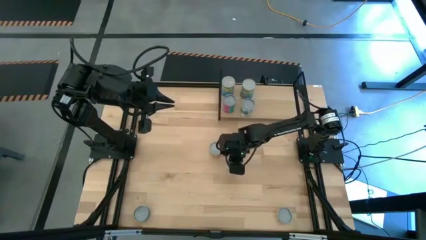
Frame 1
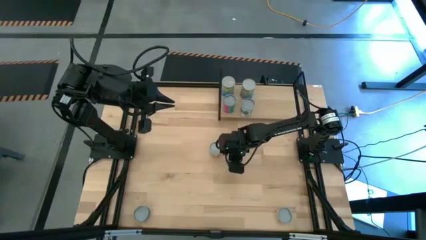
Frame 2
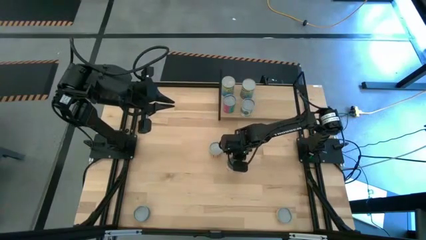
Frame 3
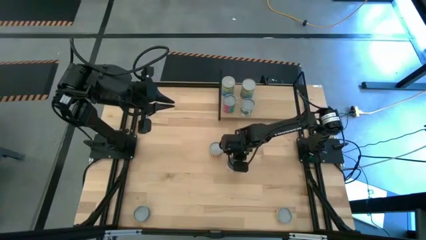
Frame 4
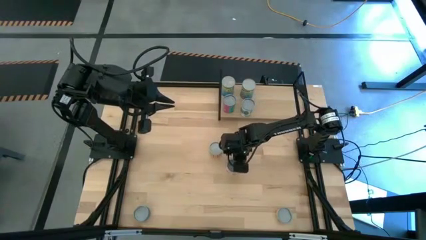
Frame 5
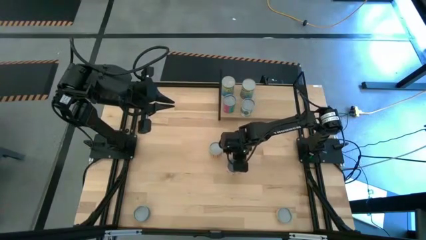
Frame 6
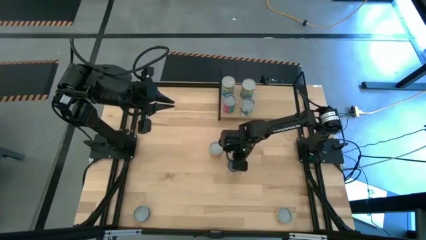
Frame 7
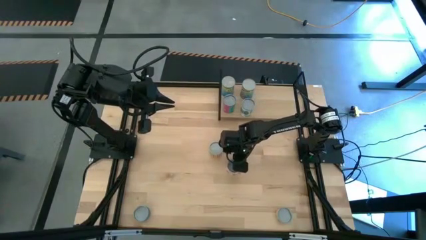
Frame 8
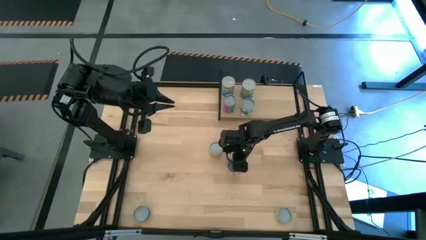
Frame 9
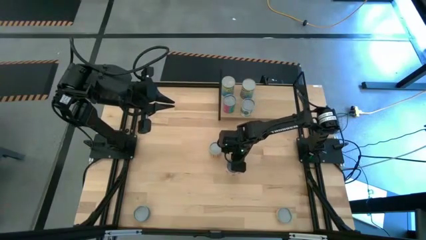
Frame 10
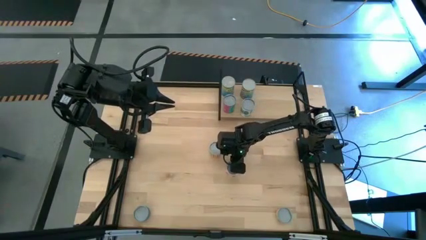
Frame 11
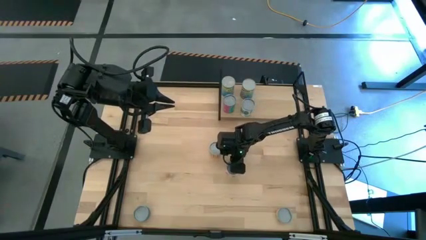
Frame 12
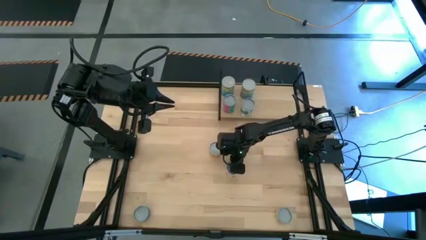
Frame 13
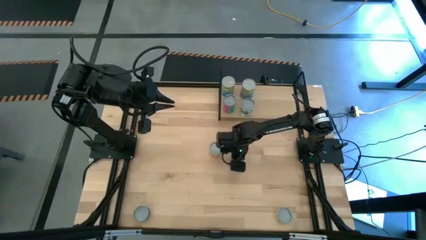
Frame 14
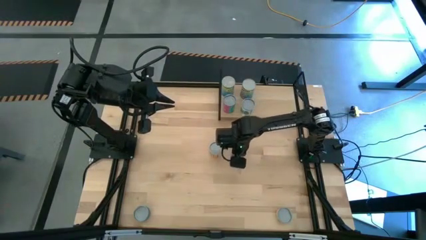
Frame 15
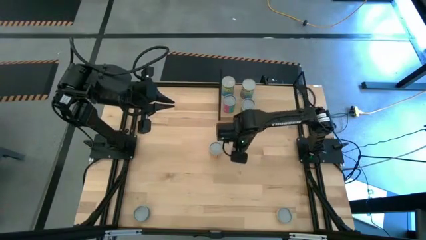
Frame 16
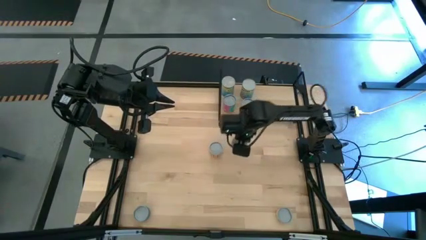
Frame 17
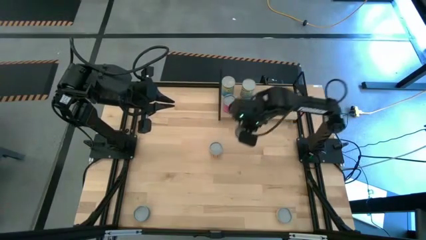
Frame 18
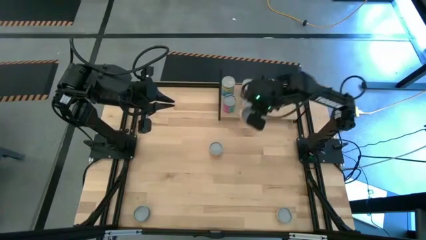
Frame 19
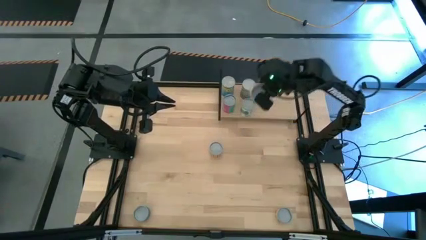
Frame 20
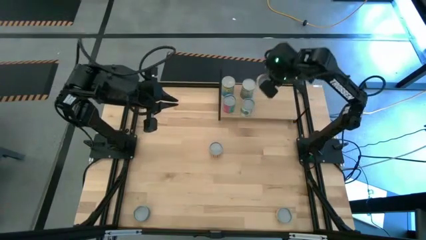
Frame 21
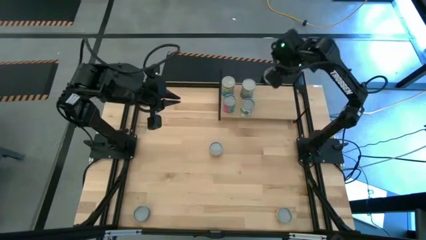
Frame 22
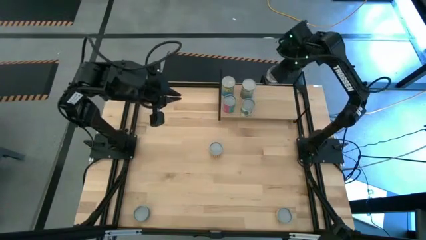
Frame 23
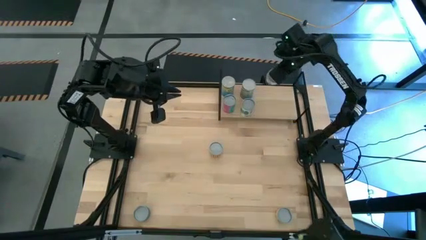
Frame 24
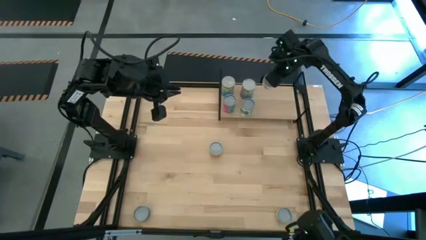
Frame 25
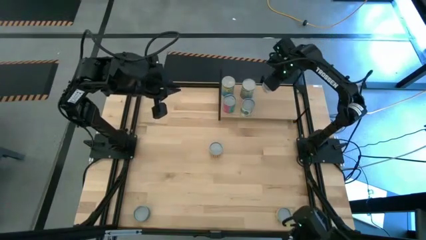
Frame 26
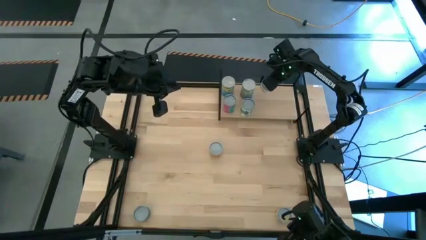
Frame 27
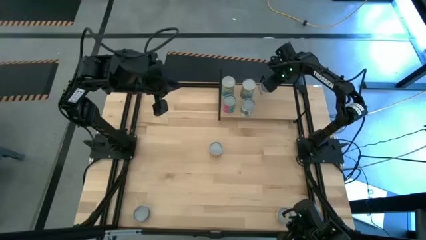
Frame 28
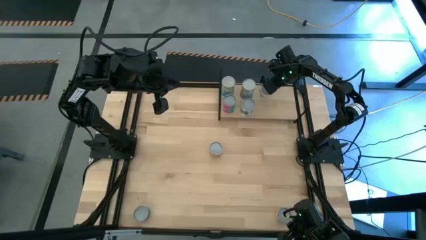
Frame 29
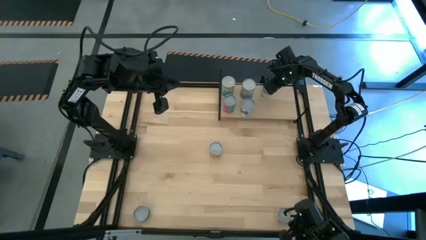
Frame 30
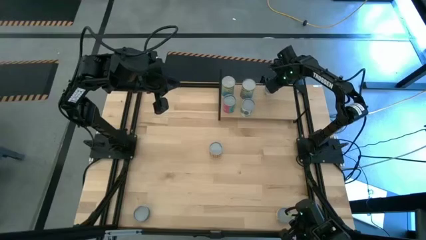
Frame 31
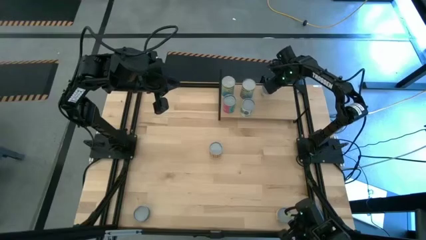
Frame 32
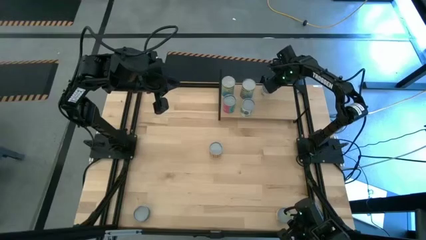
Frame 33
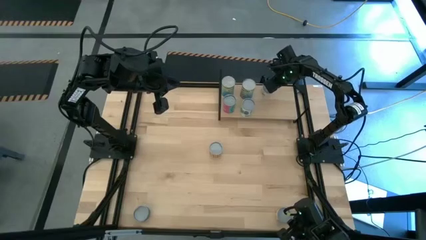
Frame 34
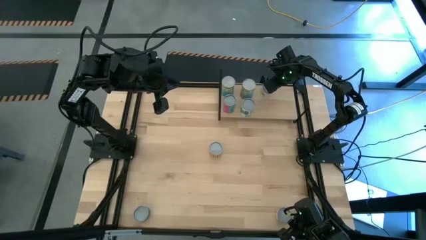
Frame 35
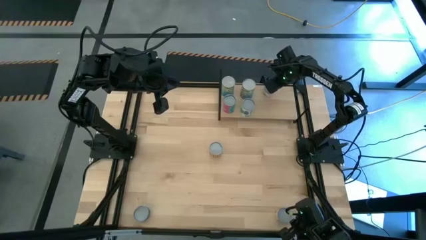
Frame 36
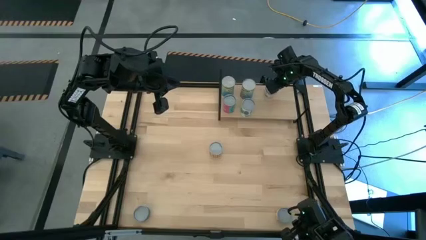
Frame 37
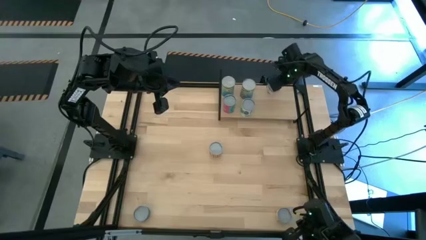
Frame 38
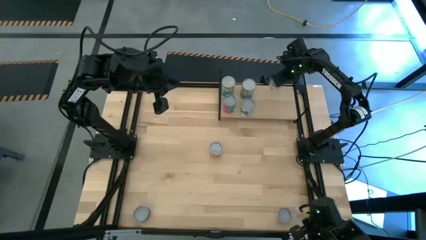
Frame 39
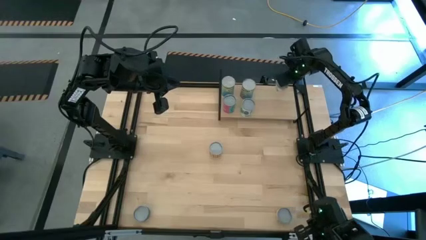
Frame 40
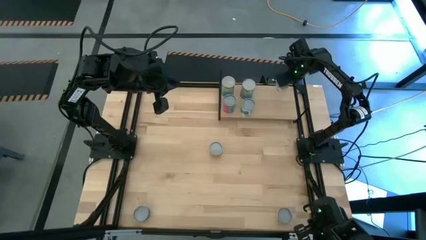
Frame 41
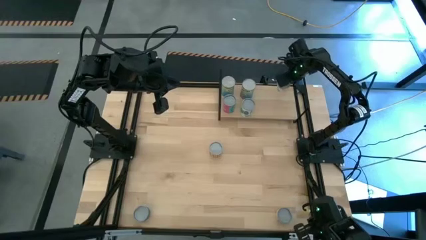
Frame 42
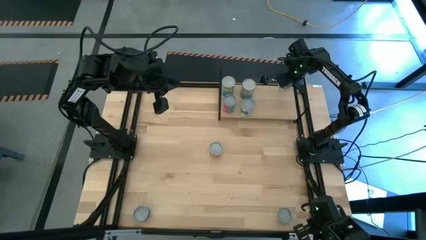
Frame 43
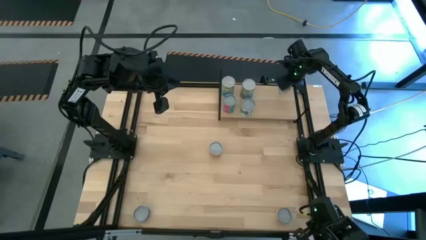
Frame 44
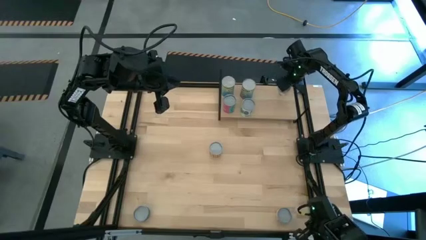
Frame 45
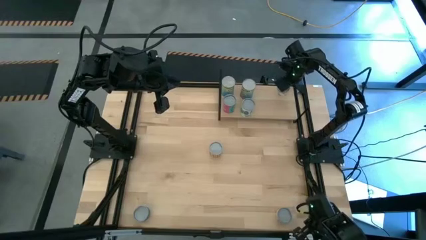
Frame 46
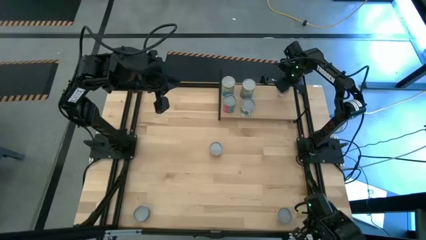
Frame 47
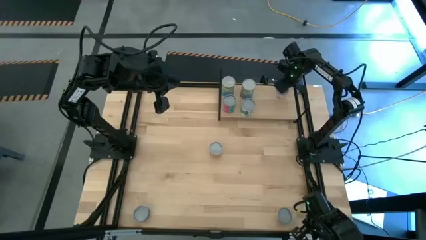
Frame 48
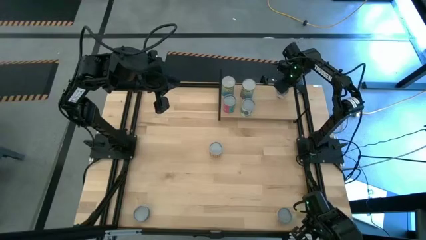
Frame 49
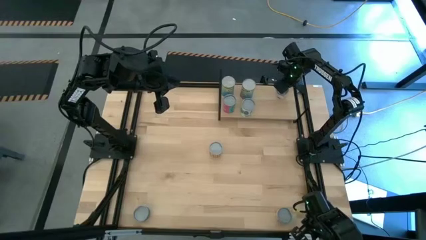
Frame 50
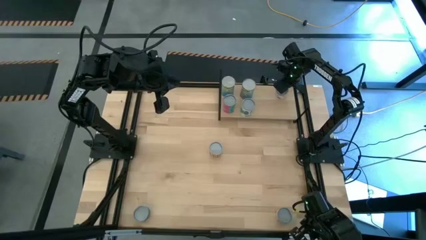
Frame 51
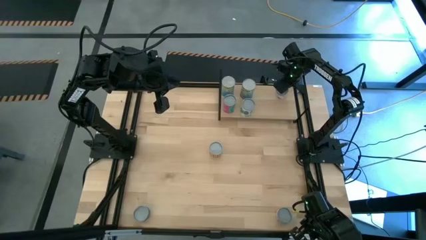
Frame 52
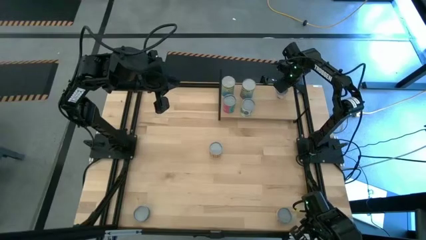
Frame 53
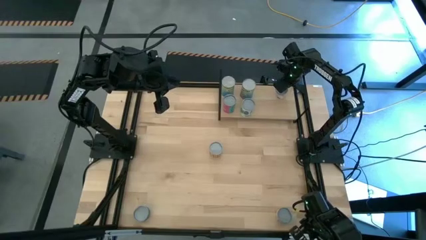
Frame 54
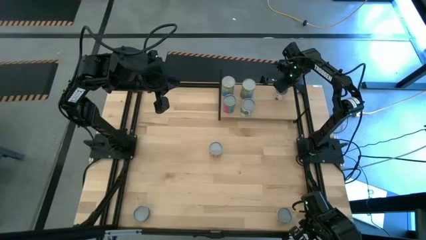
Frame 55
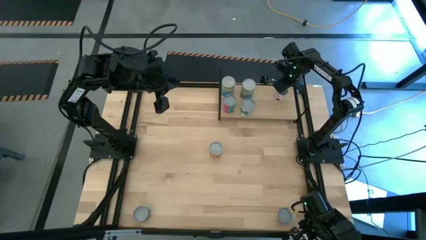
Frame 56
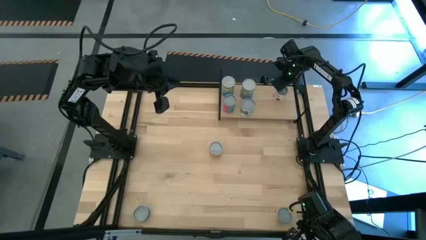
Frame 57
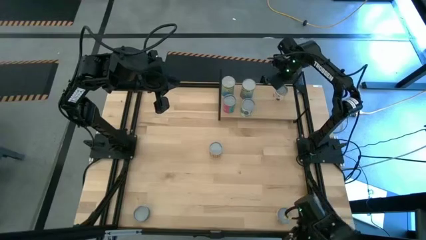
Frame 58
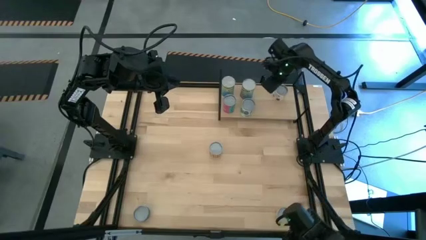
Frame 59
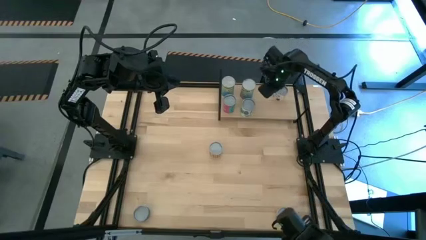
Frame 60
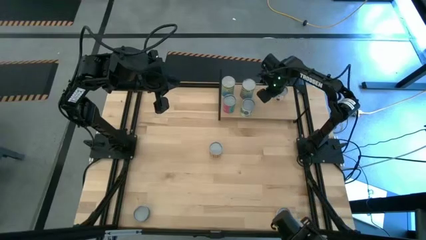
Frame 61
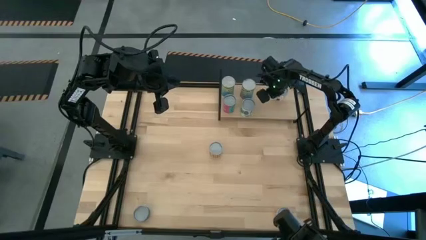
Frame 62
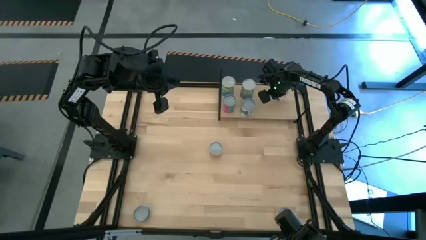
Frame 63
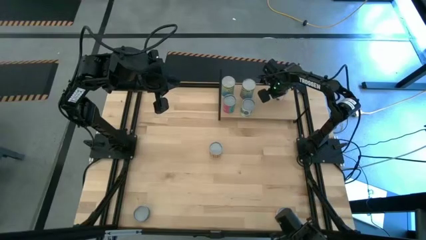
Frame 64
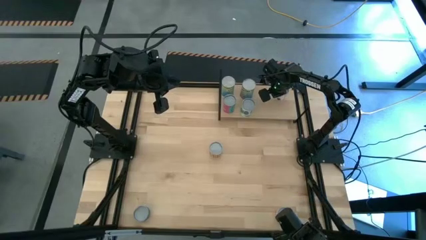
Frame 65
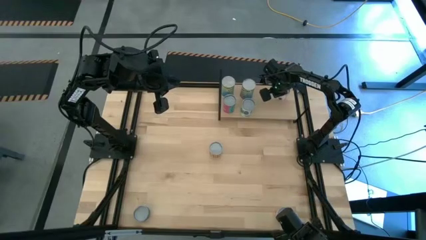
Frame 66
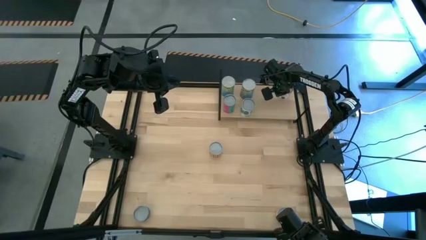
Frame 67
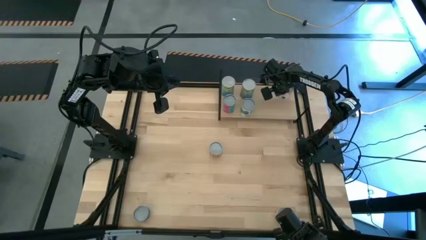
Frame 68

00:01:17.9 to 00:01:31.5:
Task: Pick and place cans onto a shelf
Put the canned saucy meatballs on the shelf
